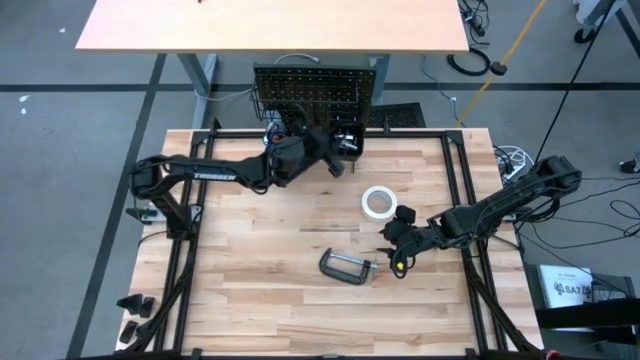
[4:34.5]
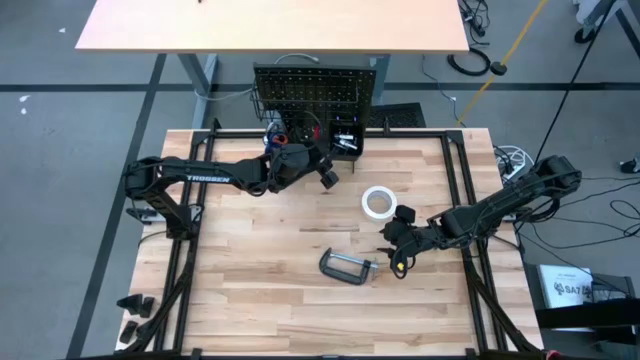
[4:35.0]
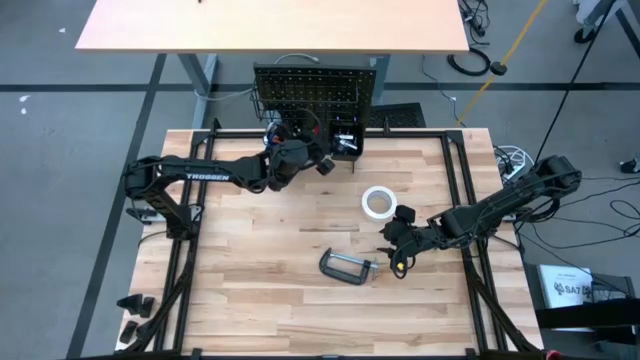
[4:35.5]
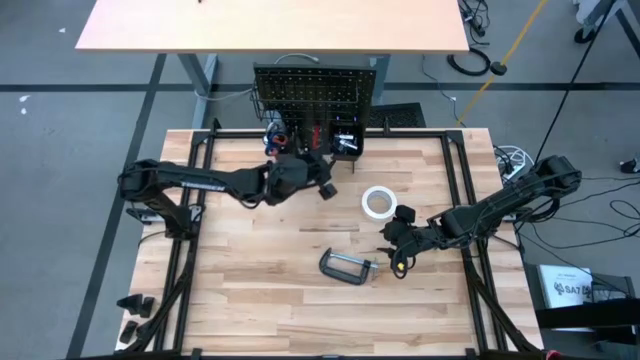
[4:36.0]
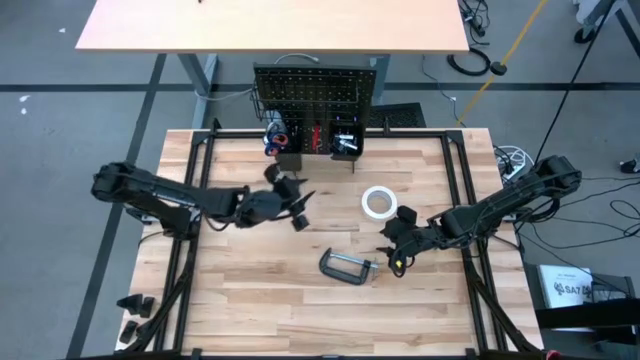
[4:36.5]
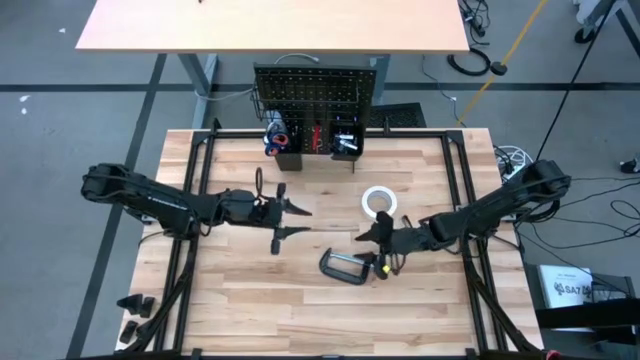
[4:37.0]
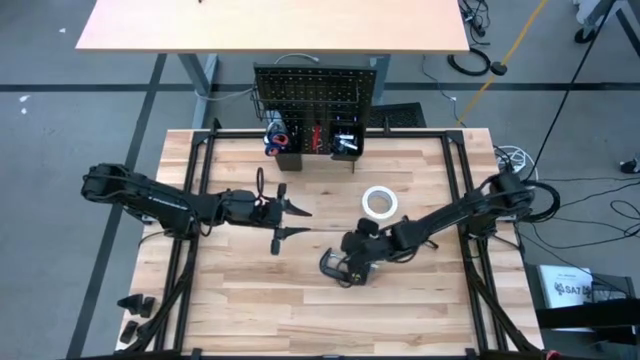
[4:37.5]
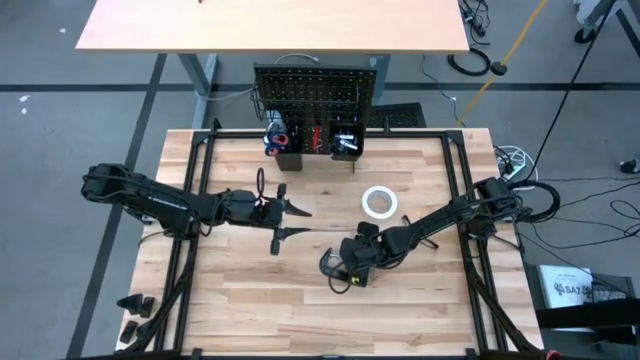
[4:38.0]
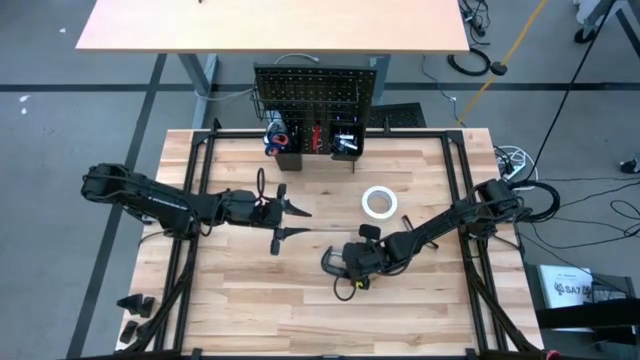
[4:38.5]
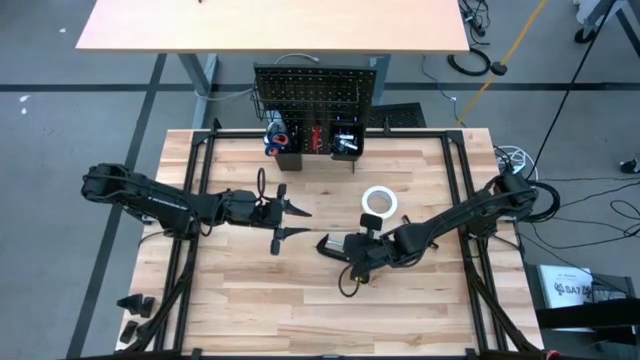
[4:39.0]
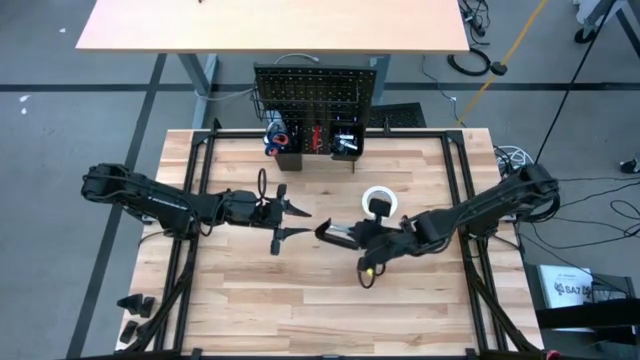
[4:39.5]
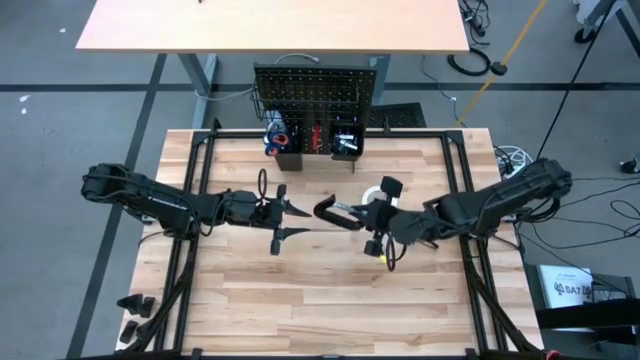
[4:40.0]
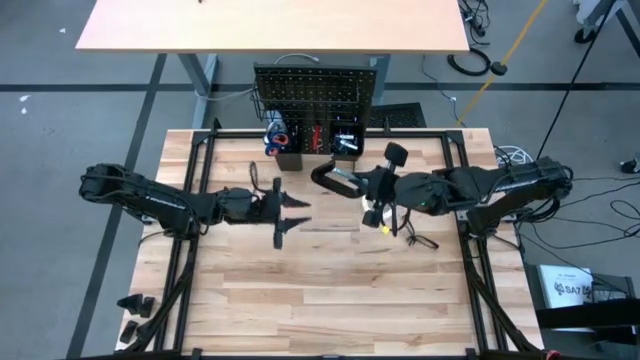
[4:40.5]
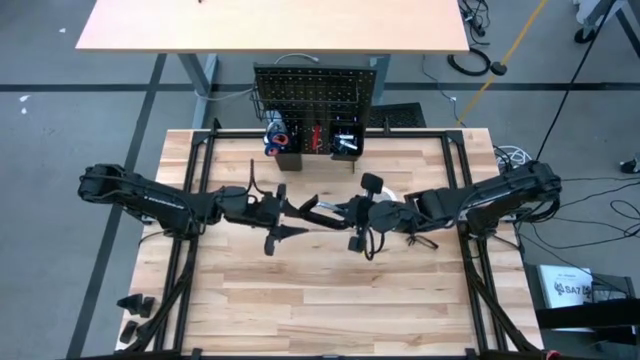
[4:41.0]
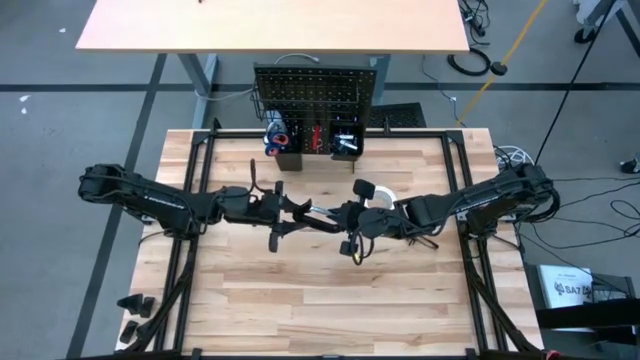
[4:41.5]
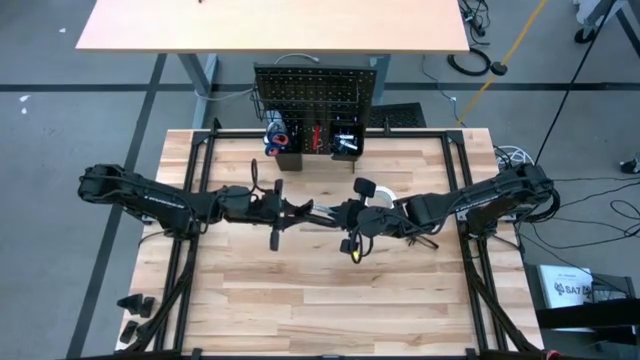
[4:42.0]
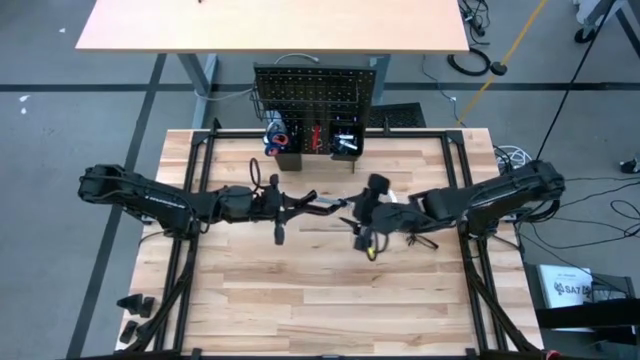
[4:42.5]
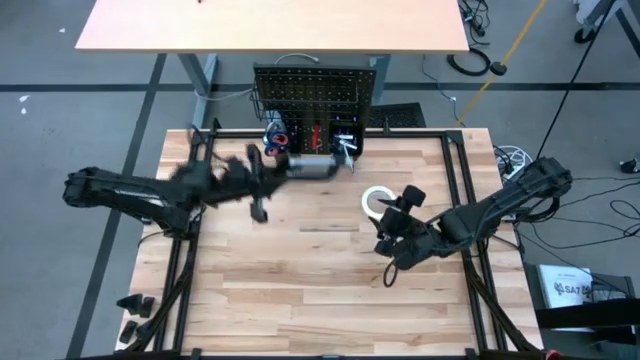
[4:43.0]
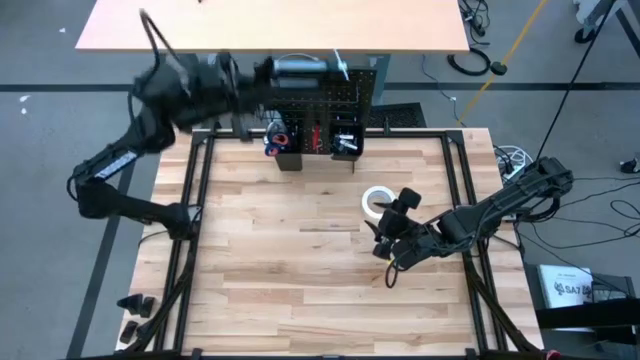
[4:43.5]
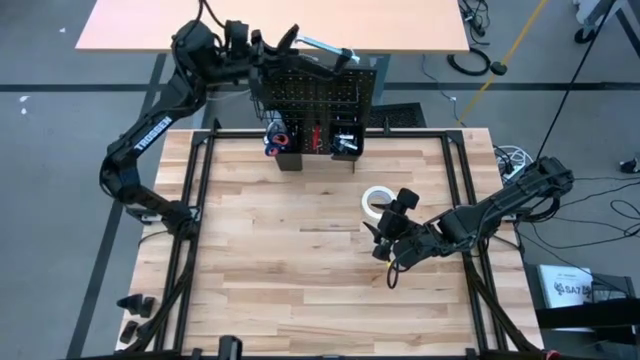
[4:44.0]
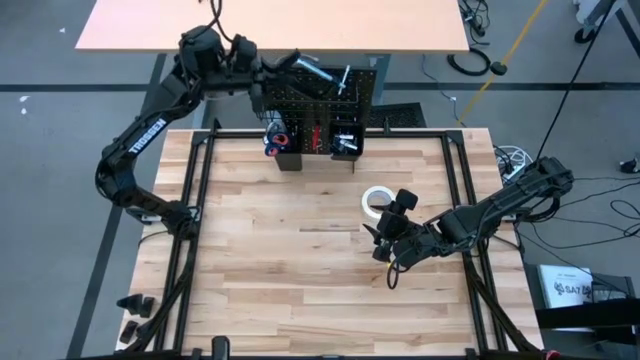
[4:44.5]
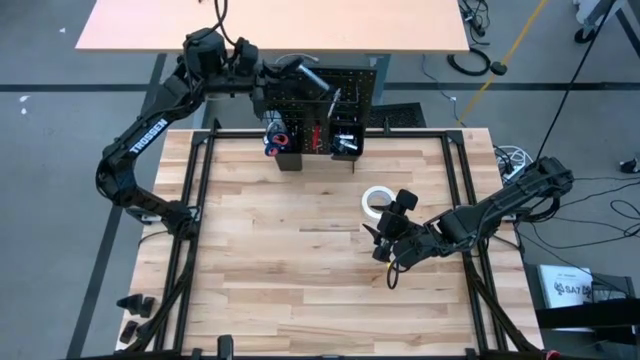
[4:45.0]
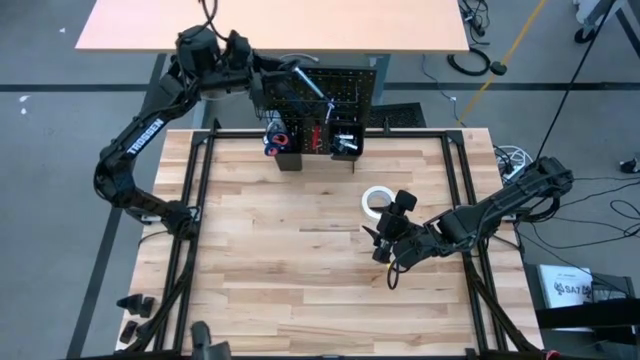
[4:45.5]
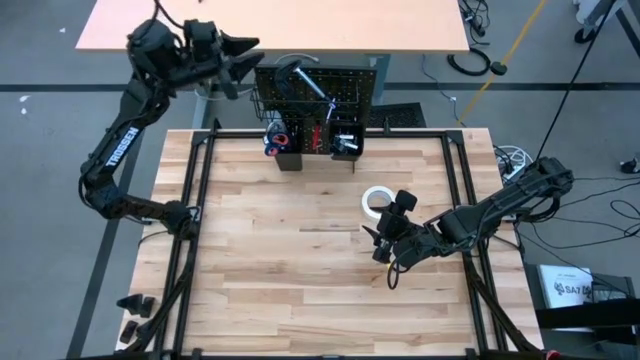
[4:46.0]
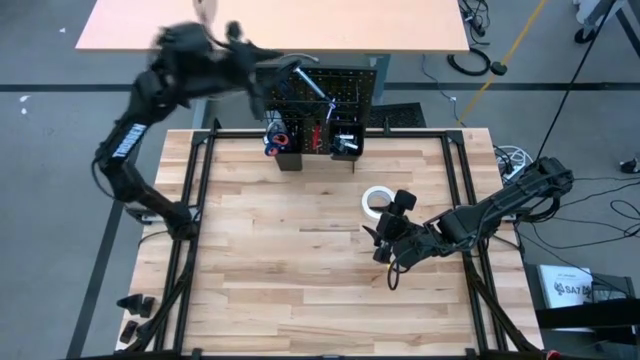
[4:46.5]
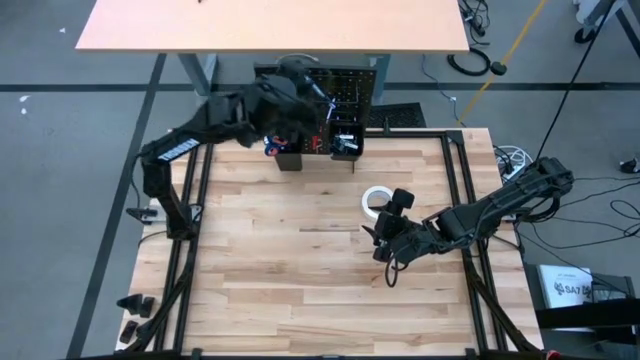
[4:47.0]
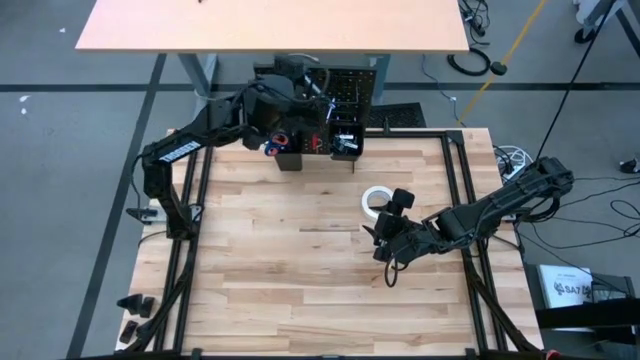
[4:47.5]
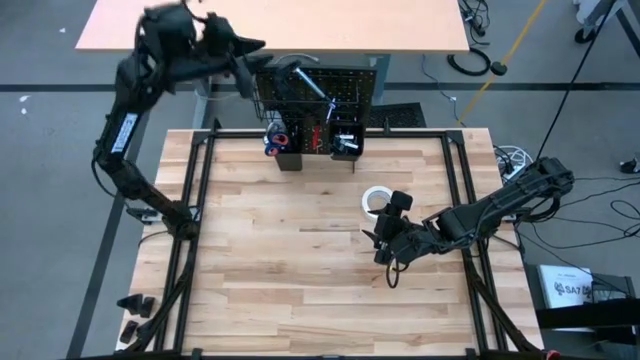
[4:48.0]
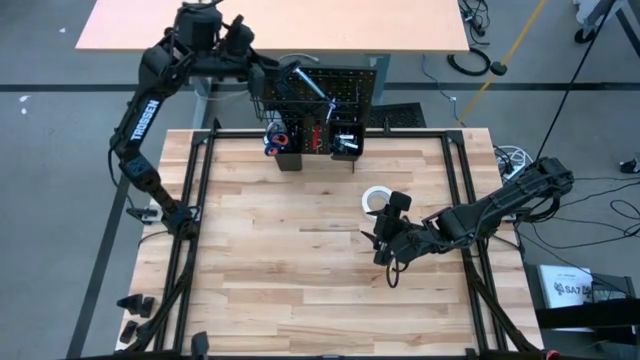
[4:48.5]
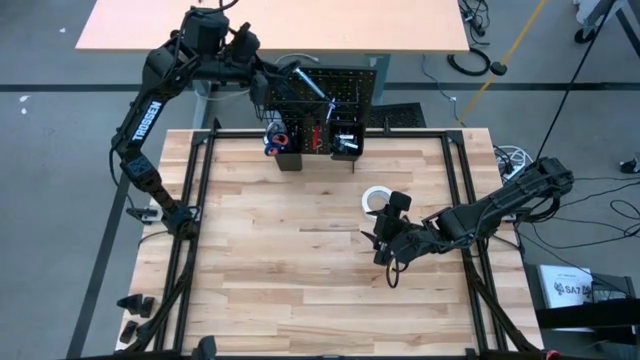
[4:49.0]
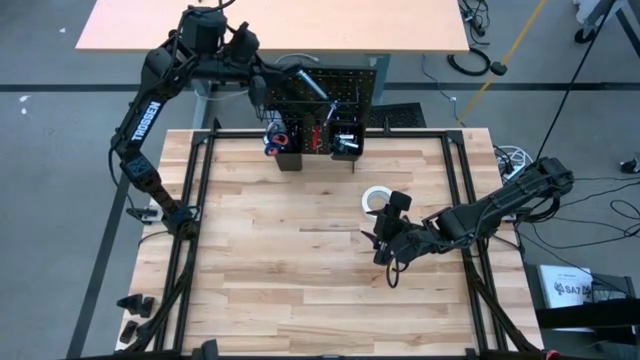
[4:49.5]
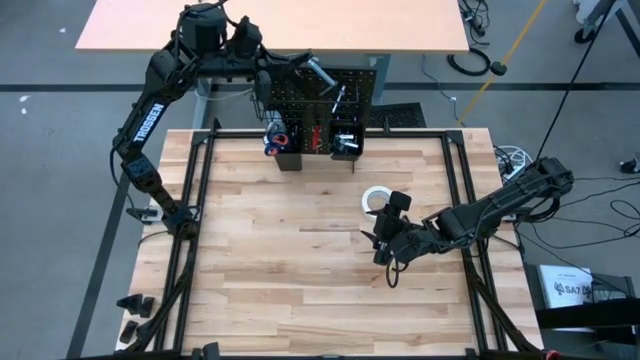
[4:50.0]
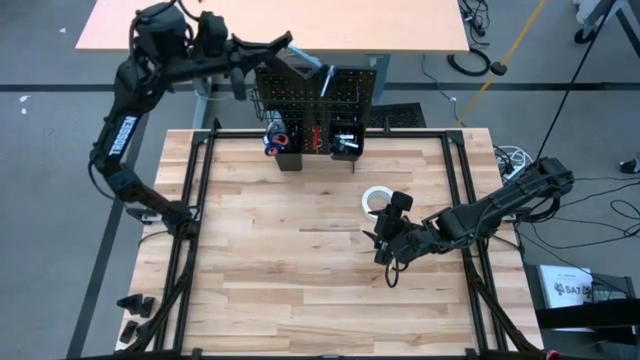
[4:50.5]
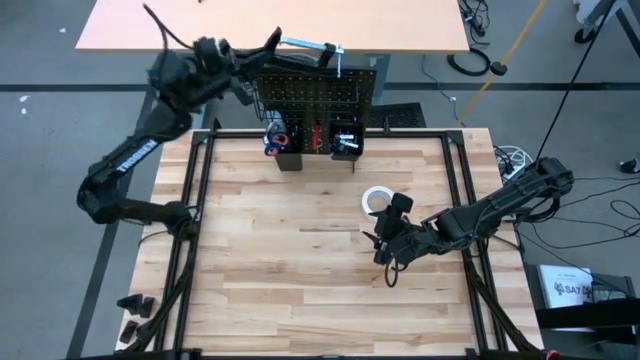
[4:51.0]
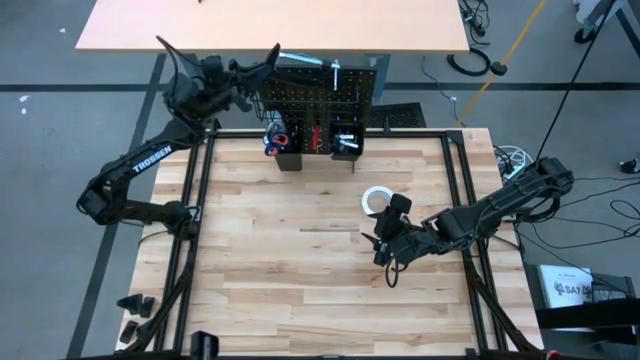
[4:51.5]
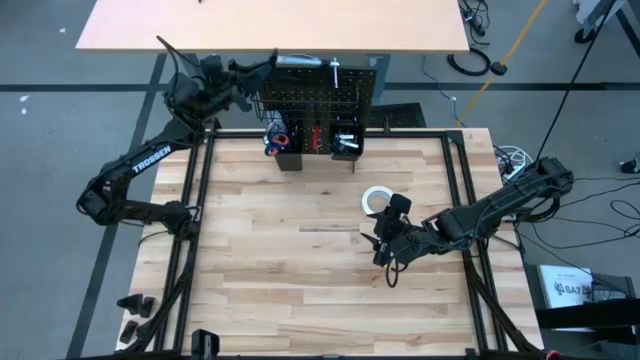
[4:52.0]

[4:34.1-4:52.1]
Task: Hang tools onto peg board
Put the black clamp on the top deck of the pegboard
